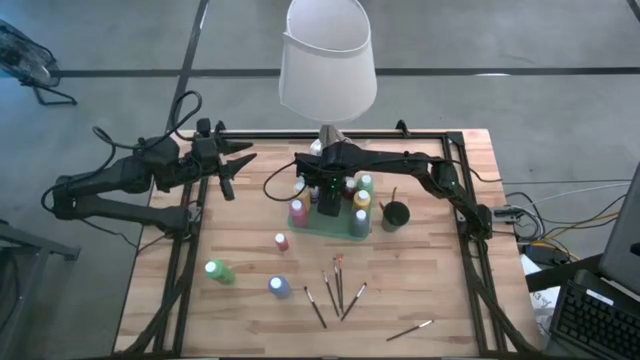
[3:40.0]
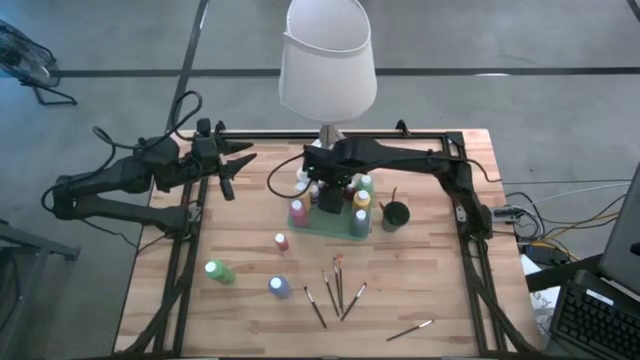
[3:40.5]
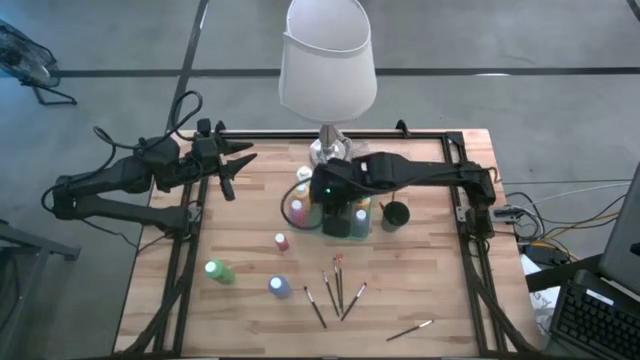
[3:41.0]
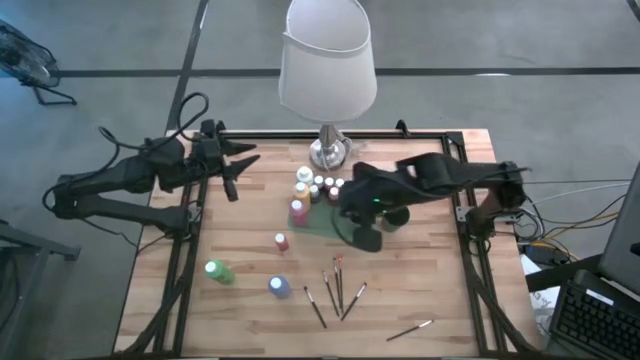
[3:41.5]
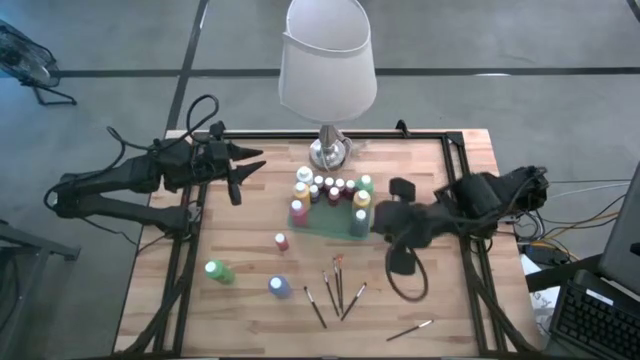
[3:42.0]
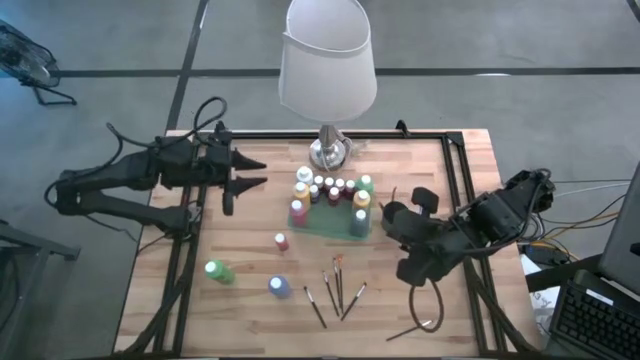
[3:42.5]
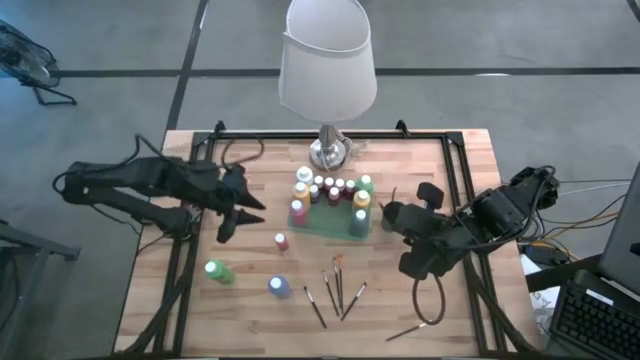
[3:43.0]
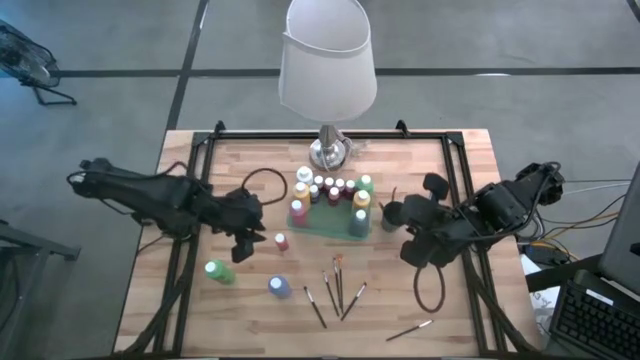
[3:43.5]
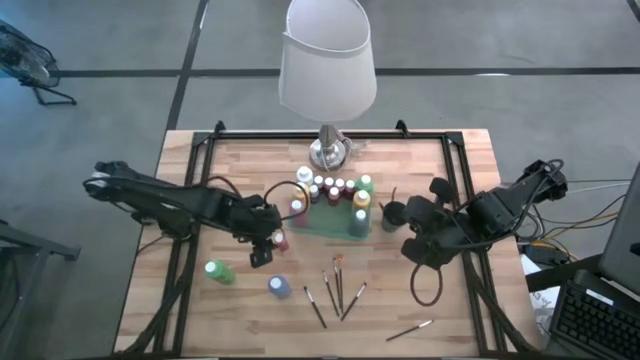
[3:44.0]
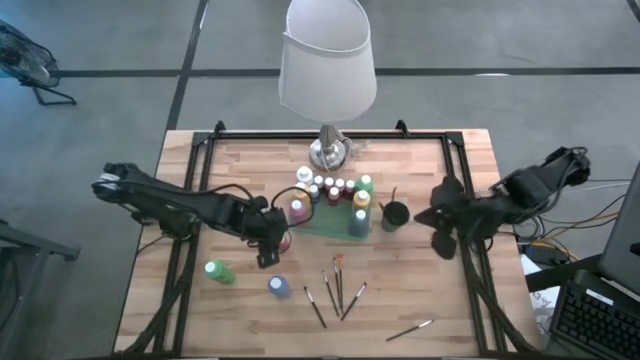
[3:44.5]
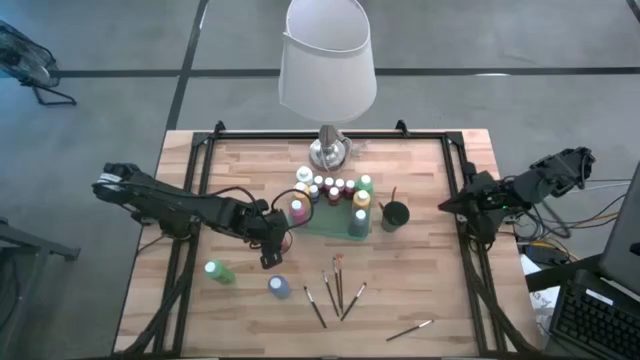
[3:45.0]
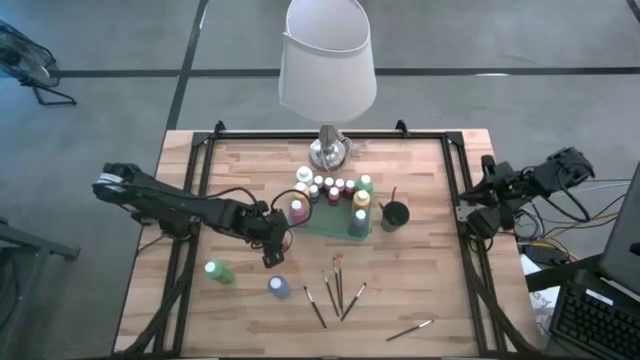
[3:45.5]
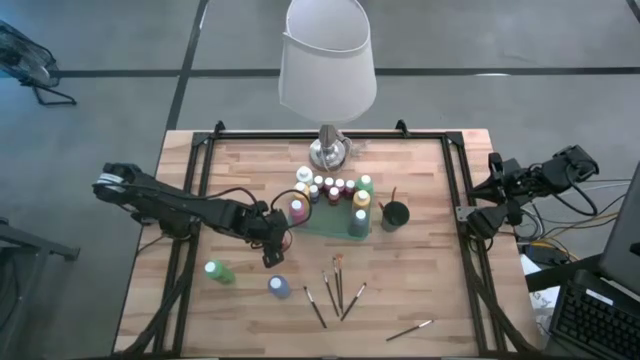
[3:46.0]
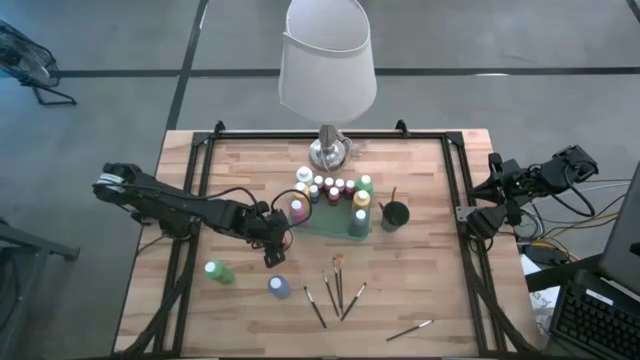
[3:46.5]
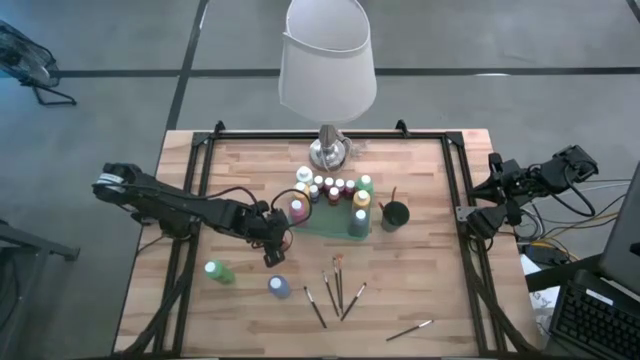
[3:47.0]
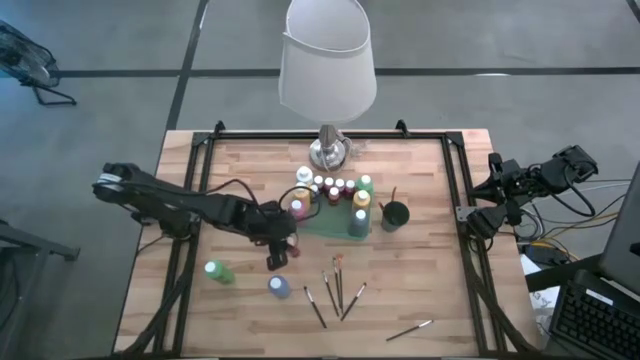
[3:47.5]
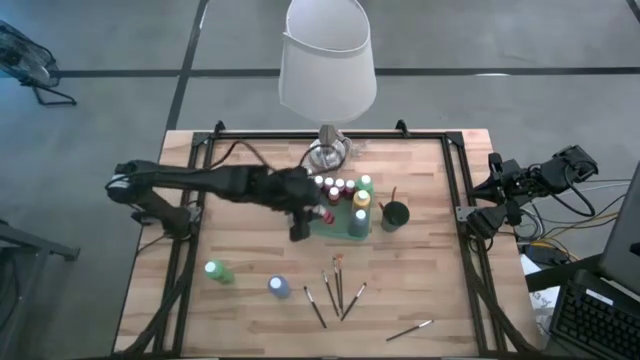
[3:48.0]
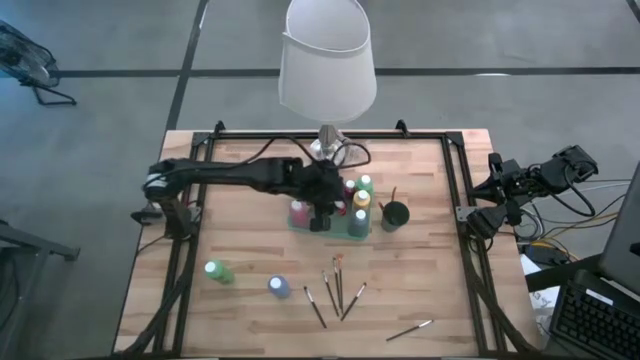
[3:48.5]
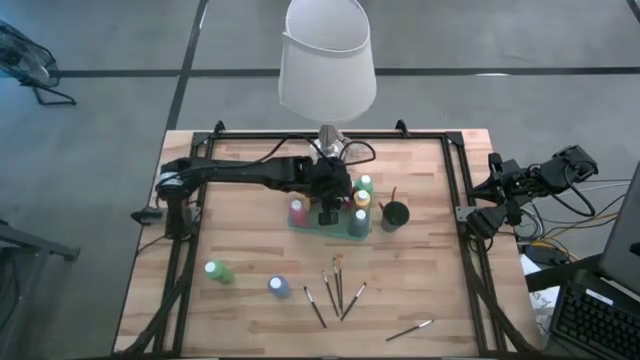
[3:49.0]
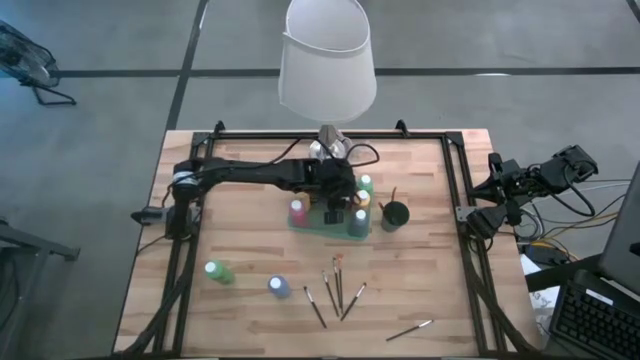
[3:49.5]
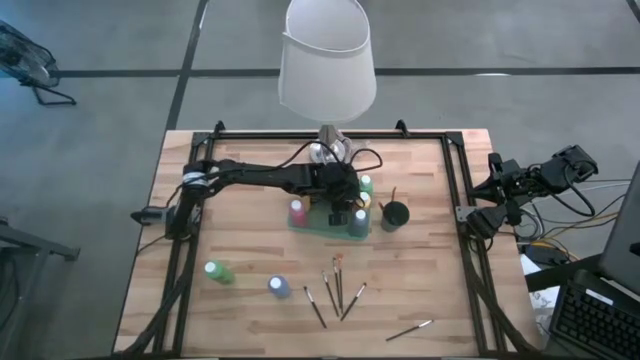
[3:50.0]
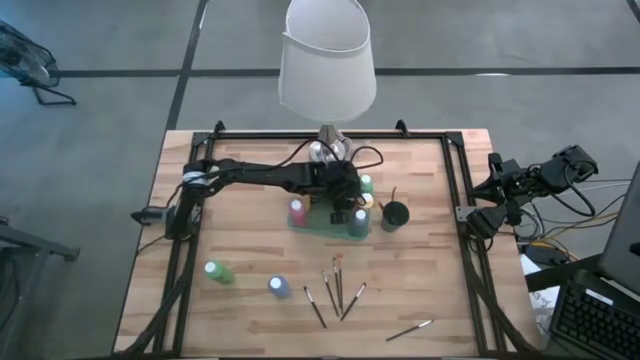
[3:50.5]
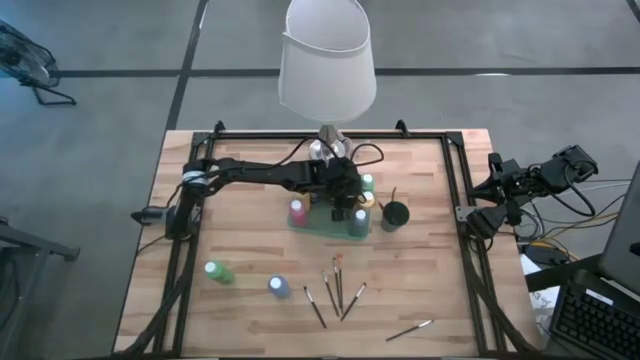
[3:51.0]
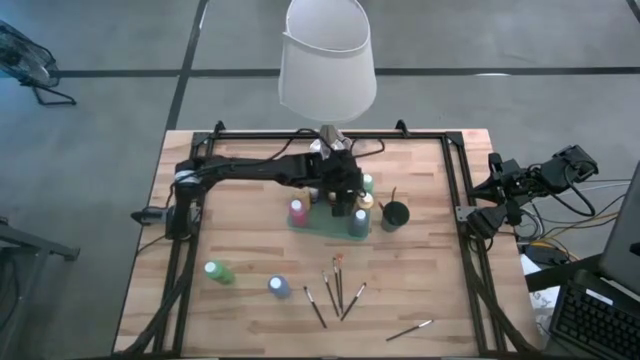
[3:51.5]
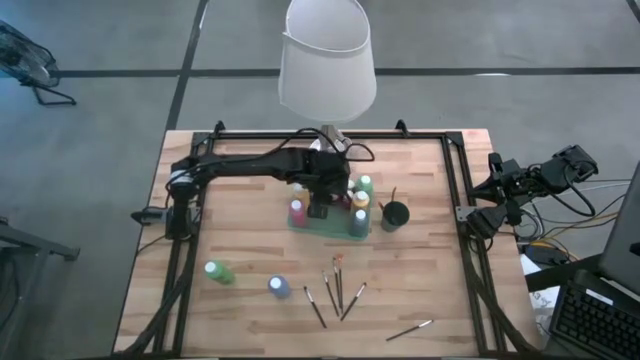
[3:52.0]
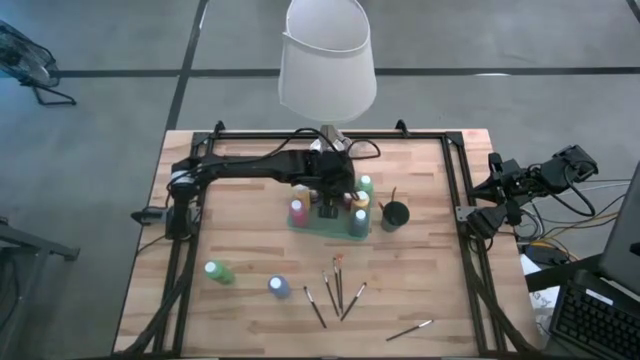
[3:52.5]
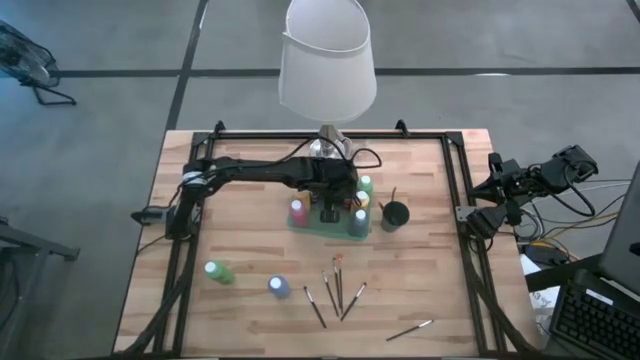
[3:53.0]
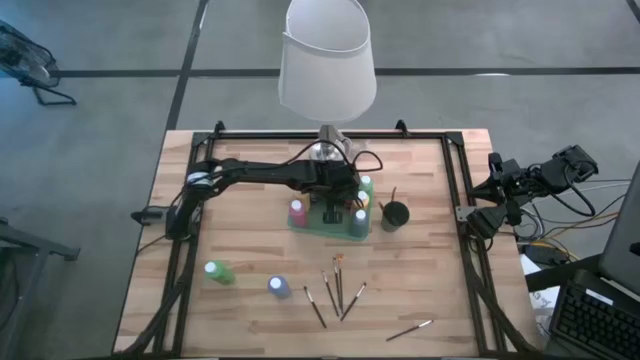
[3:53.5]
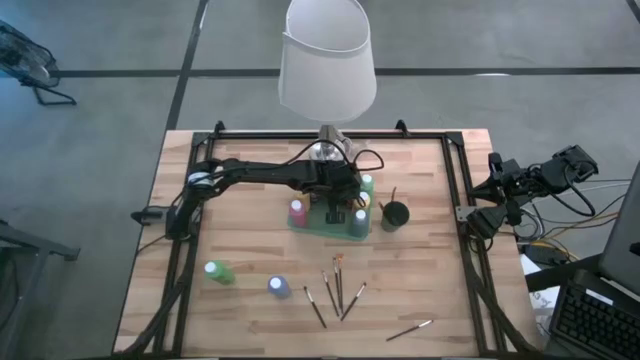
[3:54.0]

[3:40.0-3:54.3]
Task: Pick & Place Paint Supplies
Put the orange paint bottle into the green bin

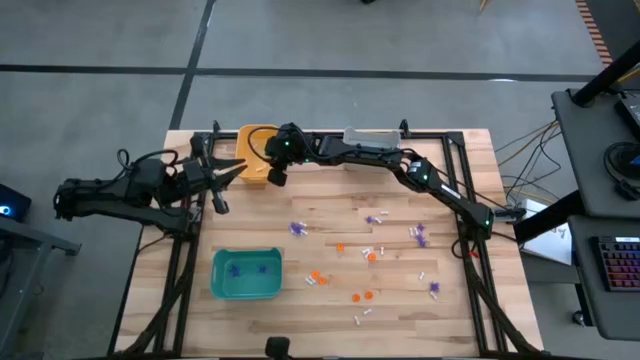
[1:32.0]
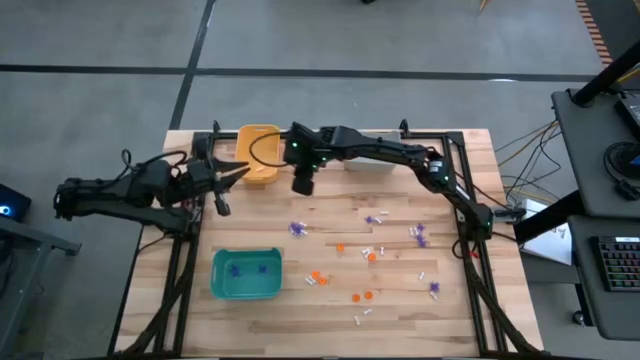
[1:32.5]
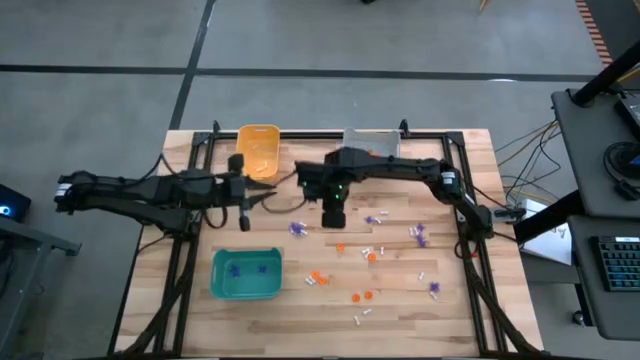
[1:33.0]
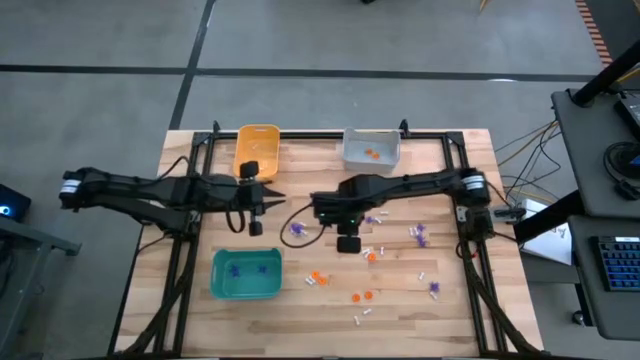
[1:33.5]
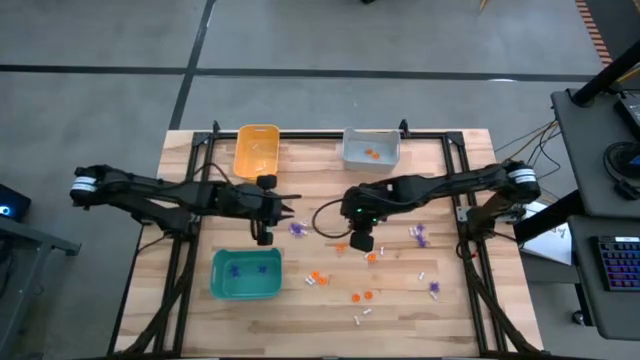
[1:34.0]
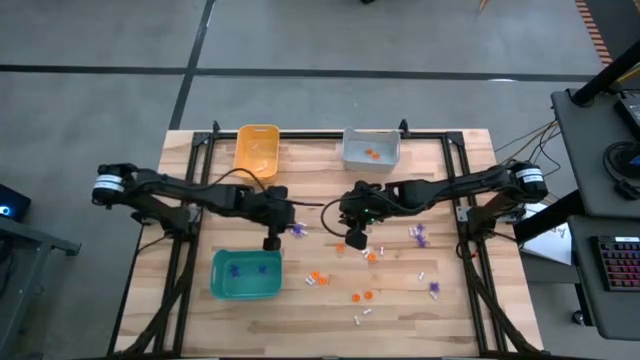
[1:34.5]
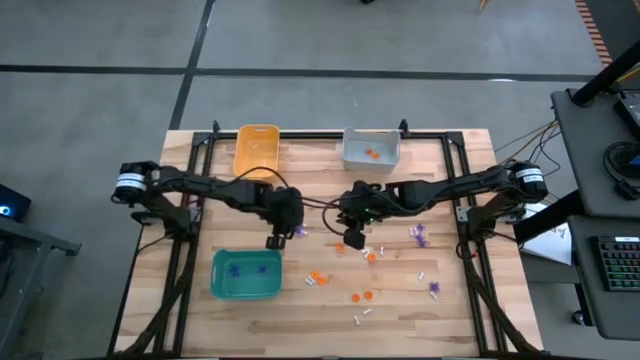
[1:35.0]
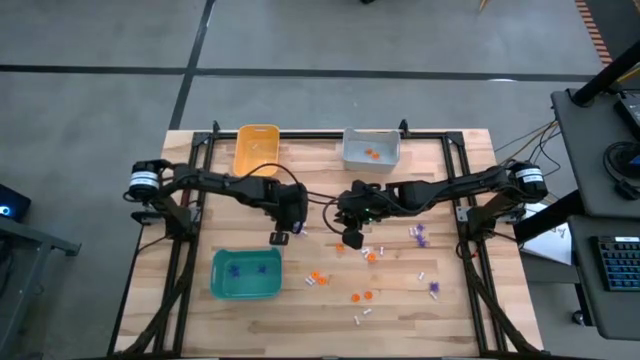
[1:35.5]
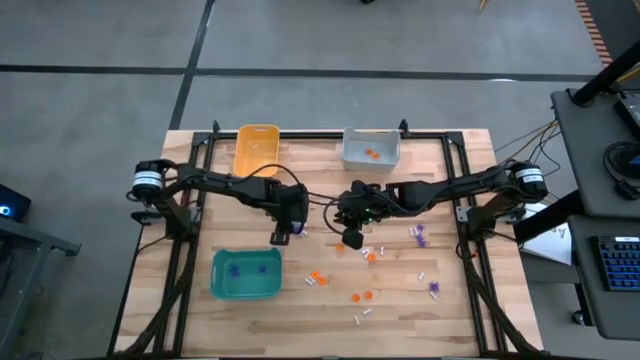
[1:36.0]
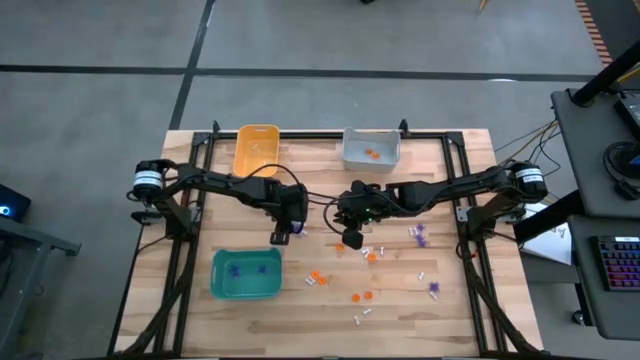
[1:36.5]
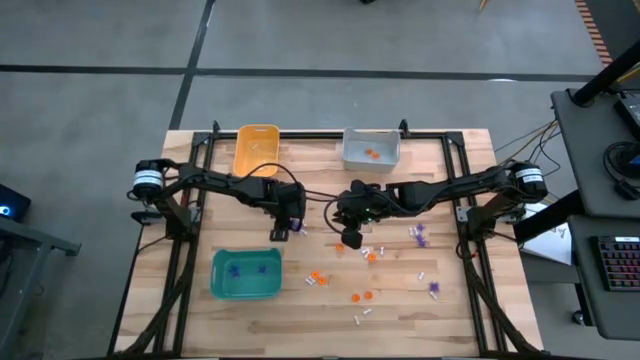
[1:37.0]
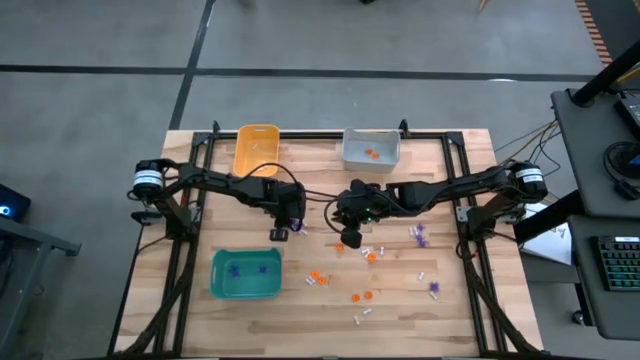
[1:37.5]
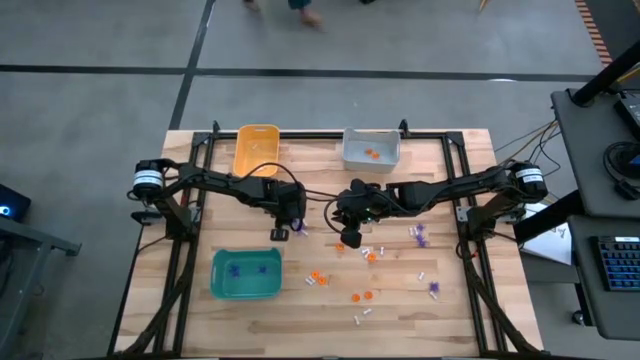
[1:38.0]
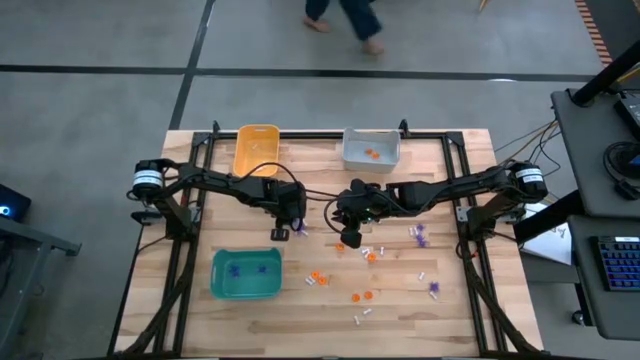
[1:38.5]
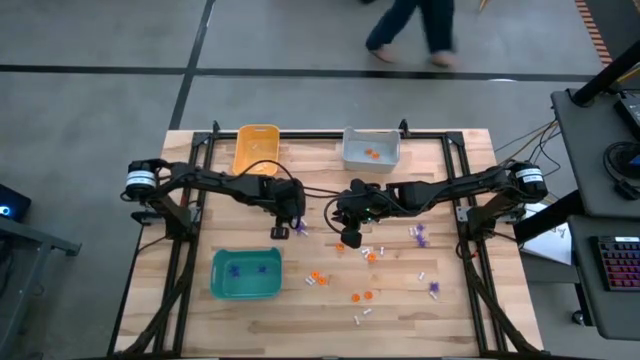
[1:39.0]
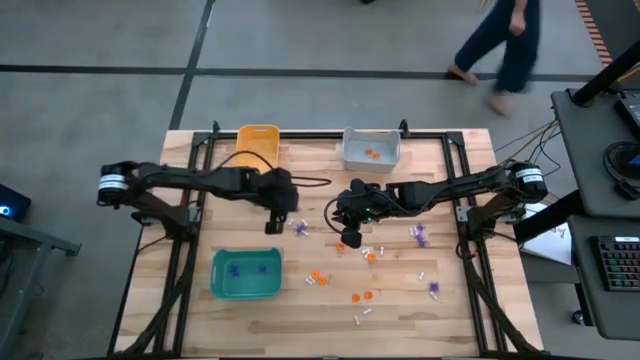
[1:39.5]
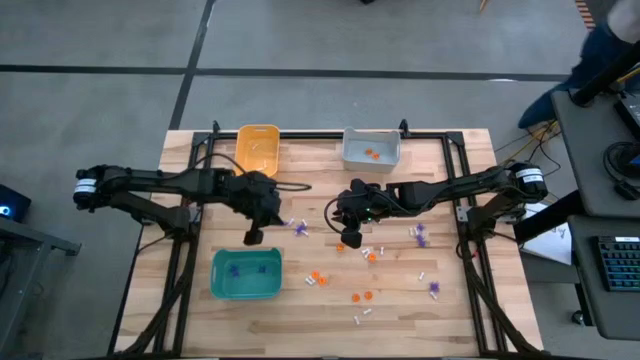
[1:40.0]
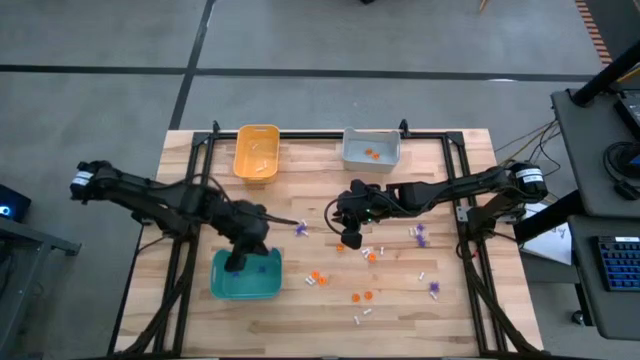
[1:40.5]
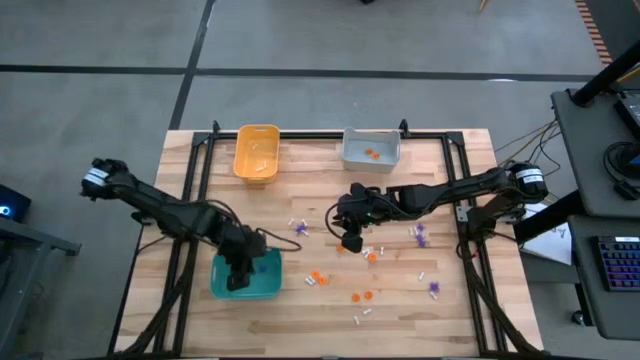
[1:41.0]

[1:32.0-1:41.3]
Task: Sort Halloween decoration
Put the blue spider toy into the green bin
